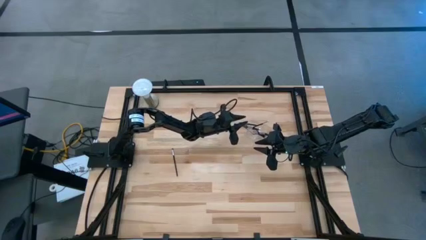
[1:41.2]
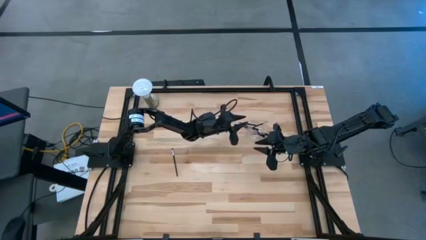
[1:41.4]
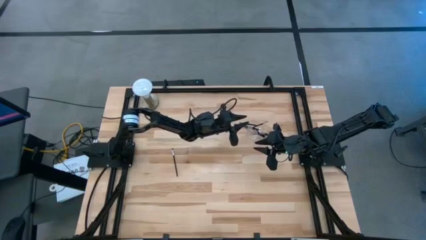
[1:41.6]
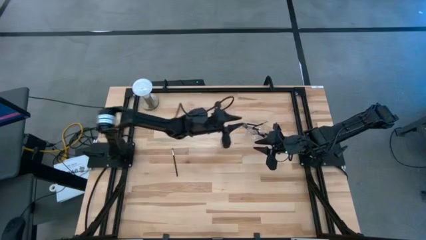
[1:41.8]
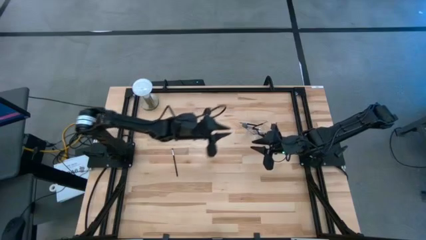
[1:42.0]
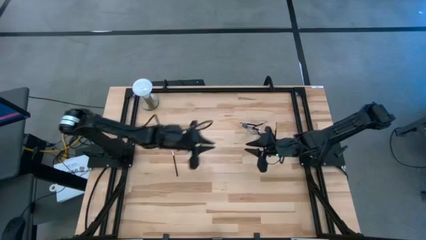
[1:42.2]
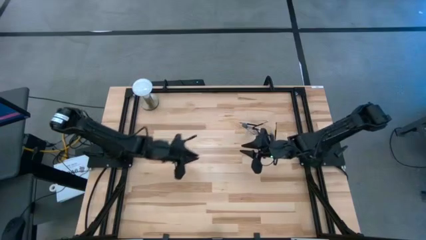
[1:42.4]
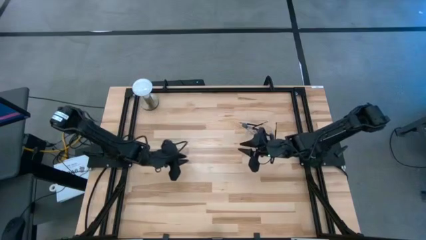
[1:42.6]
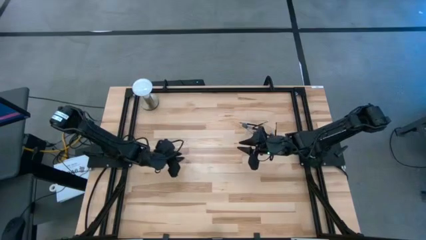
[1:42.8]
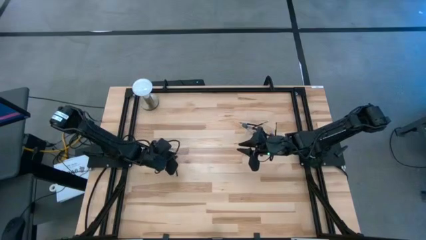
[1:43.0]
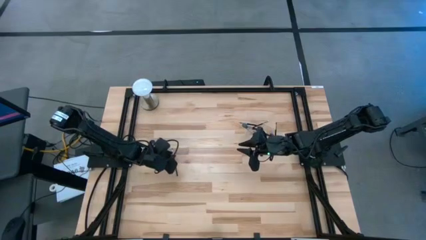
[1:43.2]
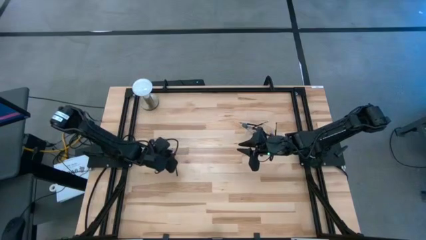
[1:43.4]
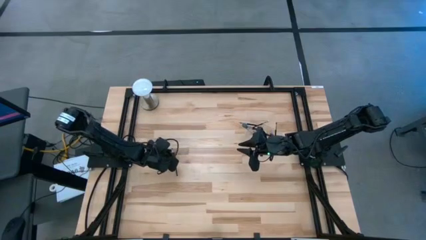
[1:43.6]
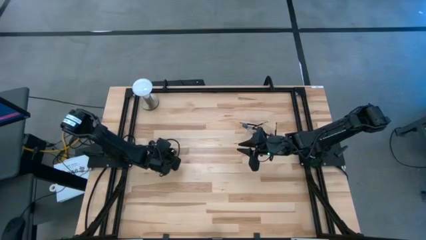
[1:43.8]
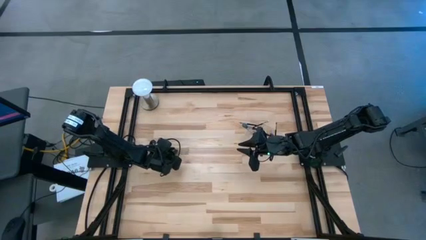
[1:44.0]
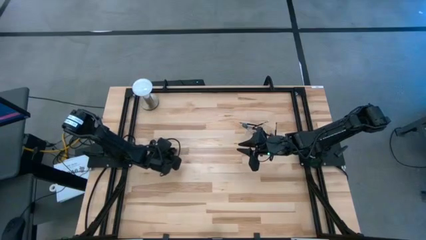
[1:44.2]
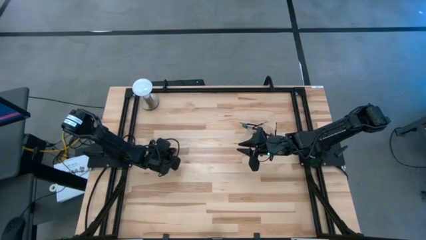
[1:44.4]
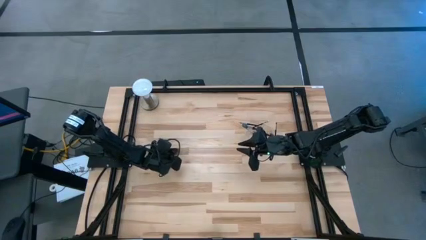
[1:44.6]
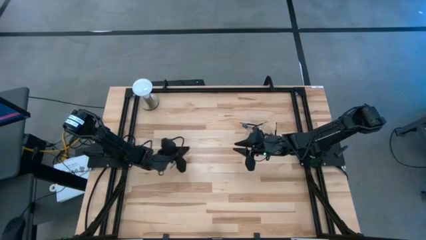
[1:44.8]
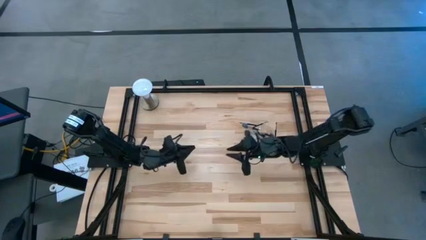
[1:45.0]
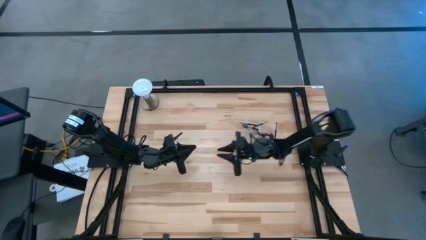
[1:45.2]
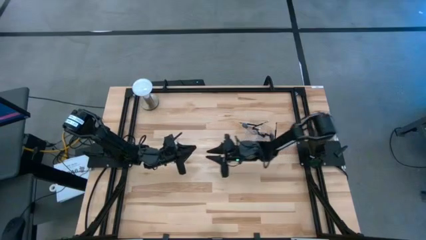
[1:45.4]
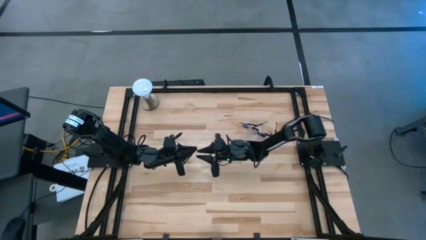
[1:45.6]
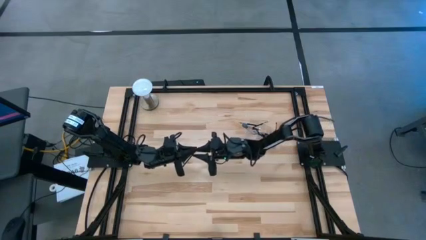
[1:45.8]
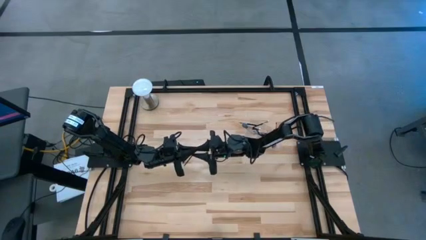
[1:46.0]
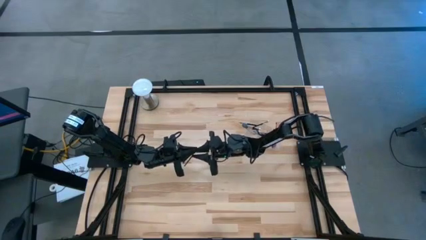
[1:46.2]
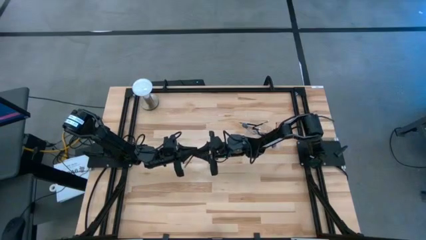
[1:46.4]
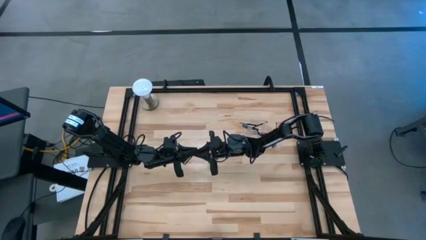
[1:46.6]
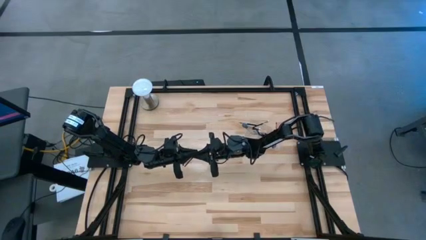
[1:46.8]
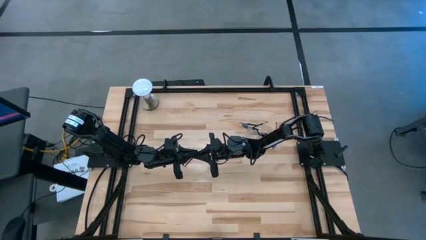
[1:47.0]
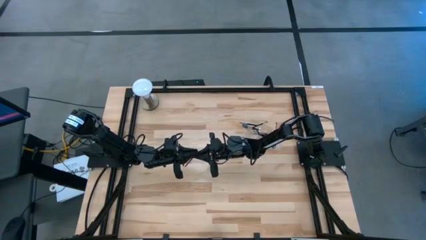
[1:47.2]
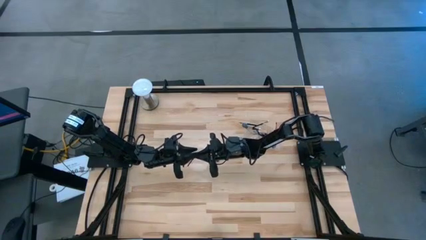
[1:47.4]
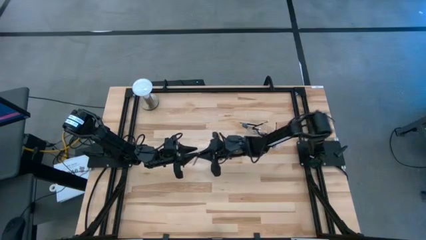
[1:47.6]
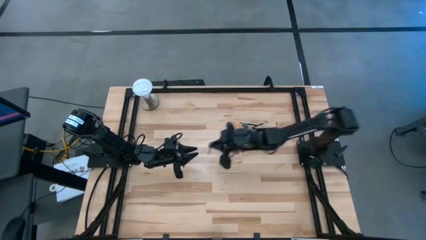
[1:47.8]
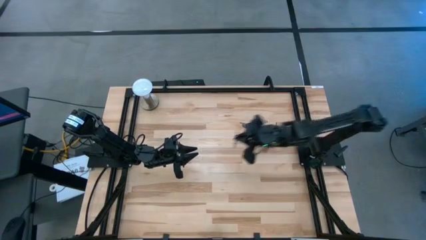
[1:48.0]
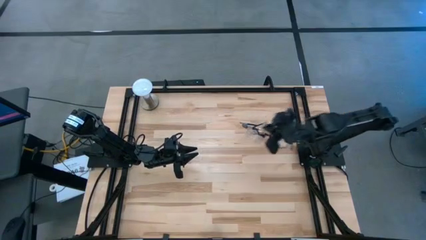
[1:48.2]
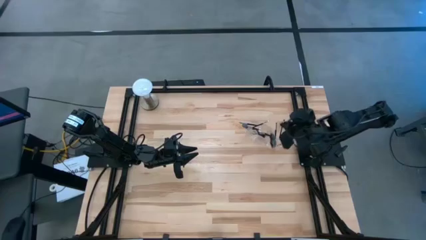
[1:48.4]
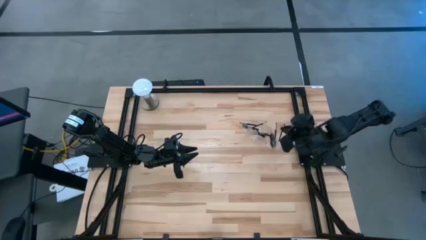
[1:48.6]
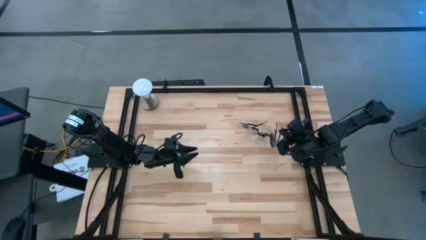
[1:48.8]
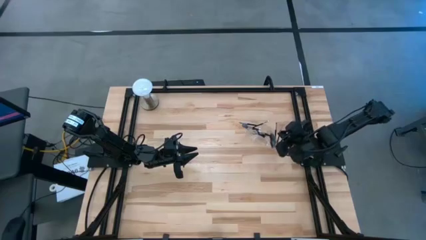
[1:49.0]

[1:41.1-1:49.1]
Task: Pick & Place Makeup Supplies
Put the black makeup brush into the transparent organizer

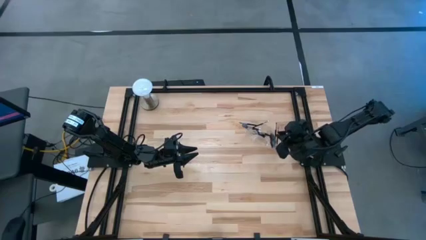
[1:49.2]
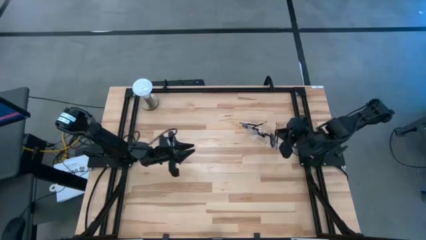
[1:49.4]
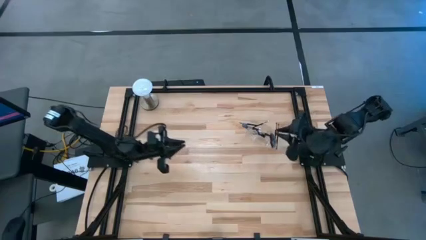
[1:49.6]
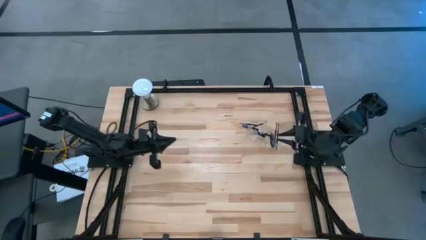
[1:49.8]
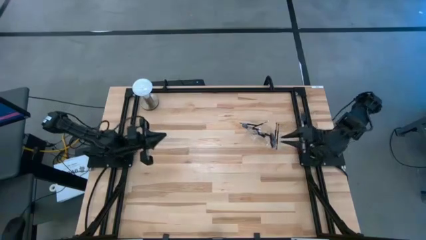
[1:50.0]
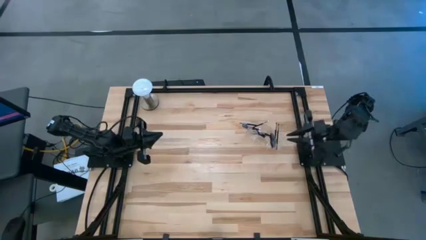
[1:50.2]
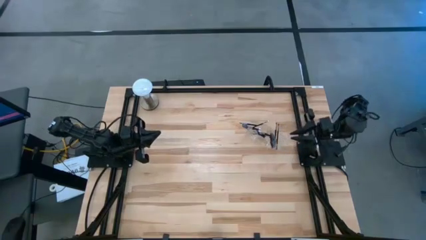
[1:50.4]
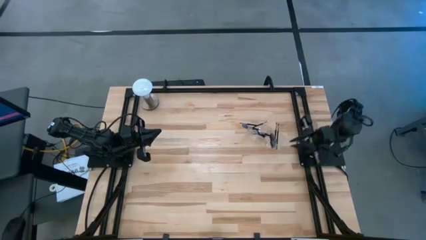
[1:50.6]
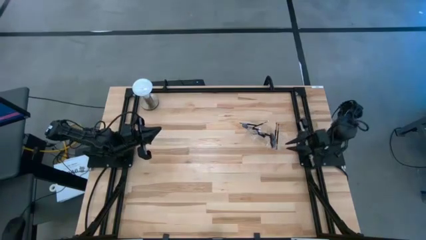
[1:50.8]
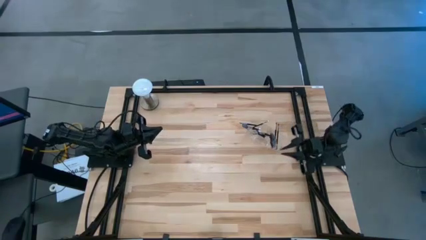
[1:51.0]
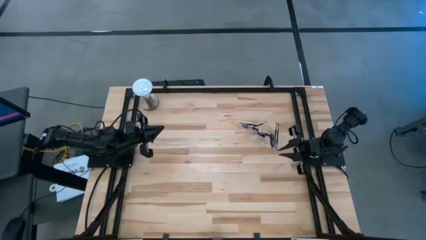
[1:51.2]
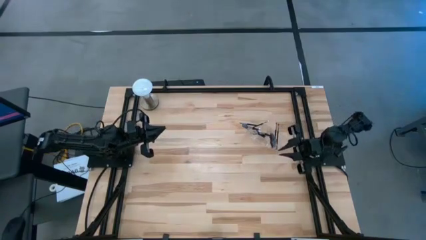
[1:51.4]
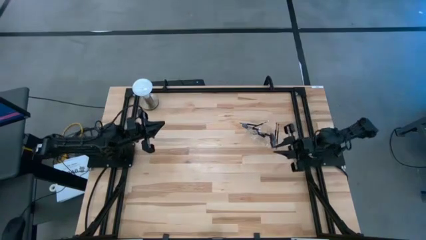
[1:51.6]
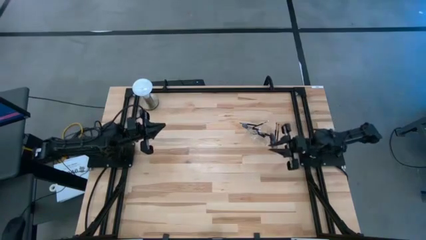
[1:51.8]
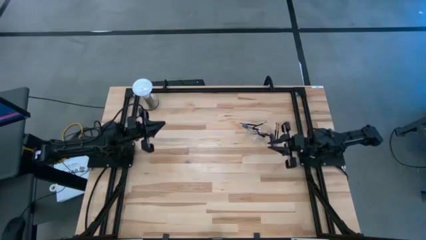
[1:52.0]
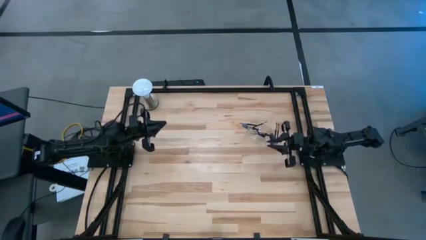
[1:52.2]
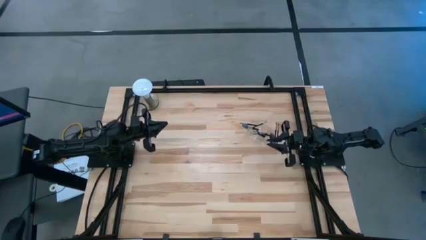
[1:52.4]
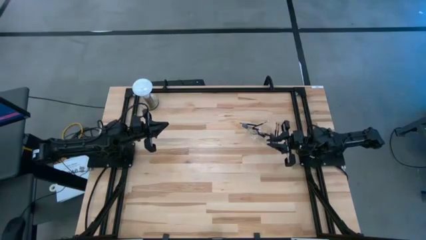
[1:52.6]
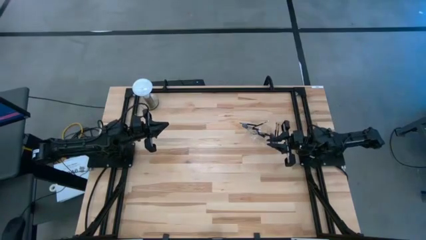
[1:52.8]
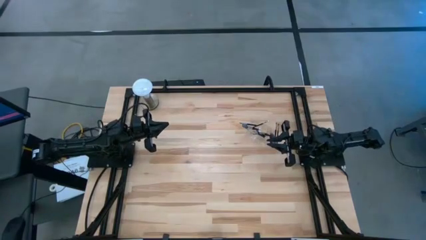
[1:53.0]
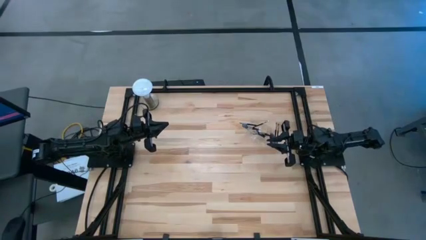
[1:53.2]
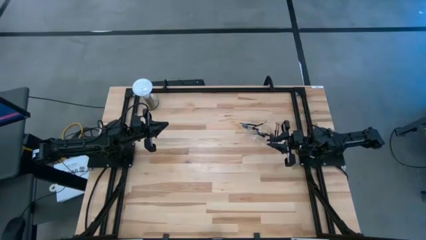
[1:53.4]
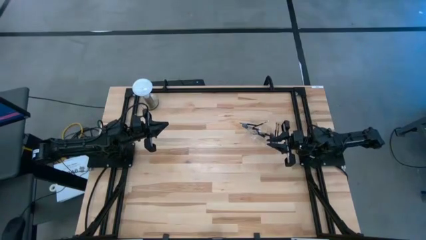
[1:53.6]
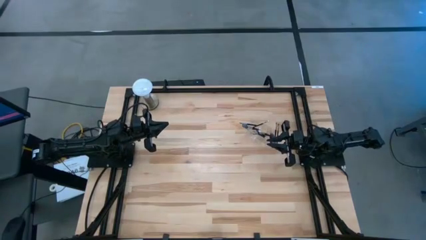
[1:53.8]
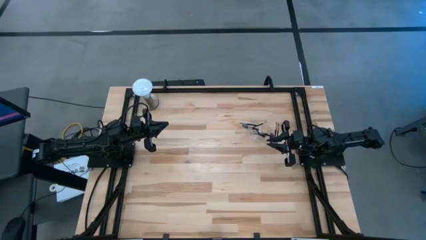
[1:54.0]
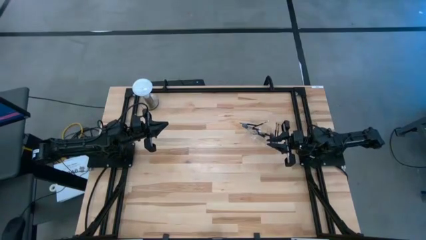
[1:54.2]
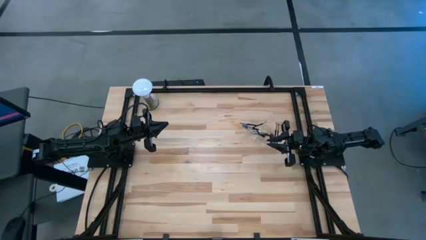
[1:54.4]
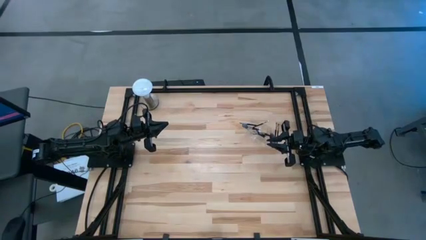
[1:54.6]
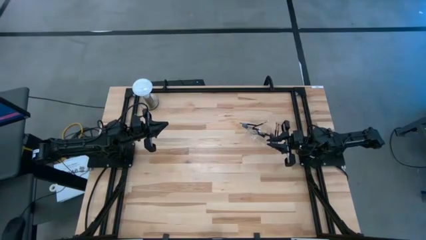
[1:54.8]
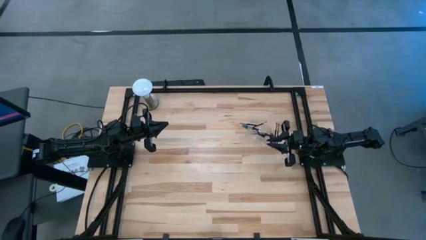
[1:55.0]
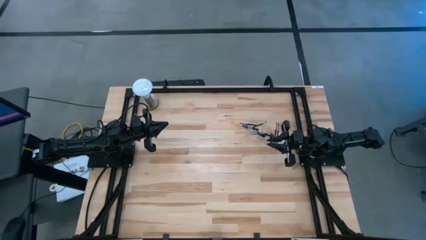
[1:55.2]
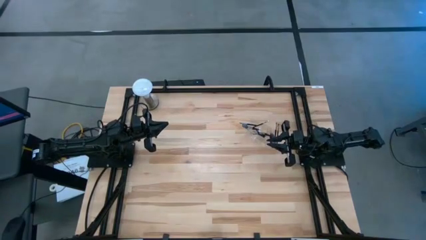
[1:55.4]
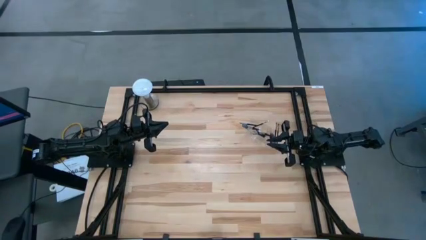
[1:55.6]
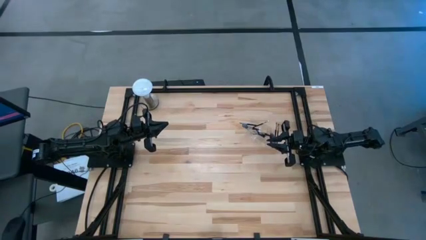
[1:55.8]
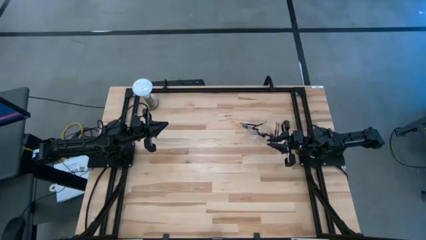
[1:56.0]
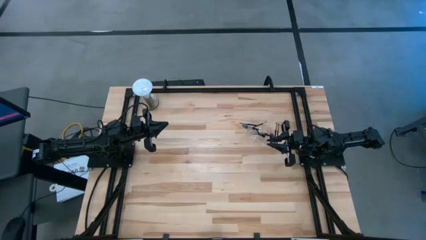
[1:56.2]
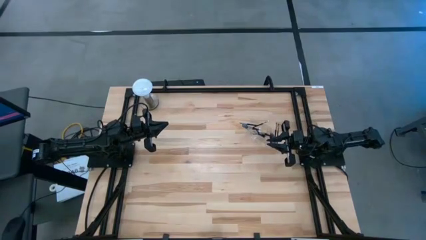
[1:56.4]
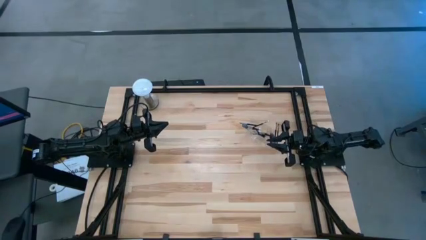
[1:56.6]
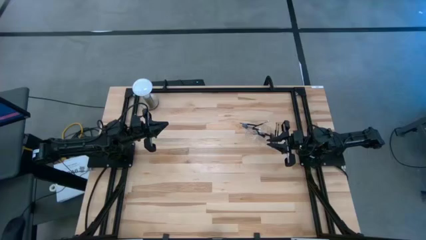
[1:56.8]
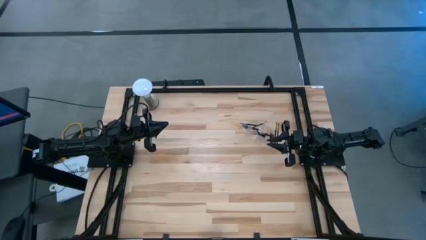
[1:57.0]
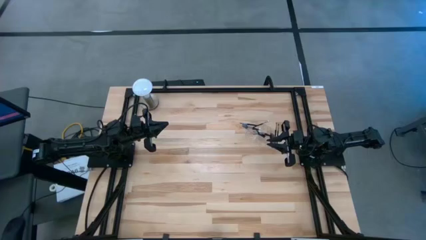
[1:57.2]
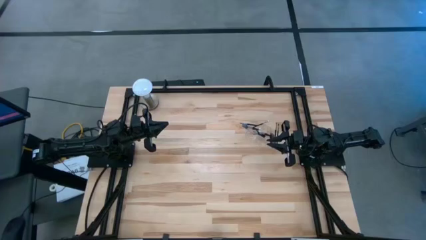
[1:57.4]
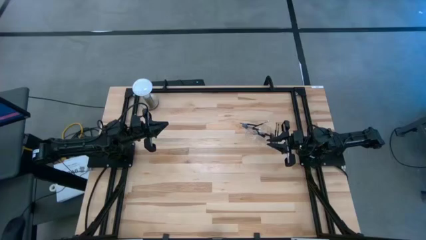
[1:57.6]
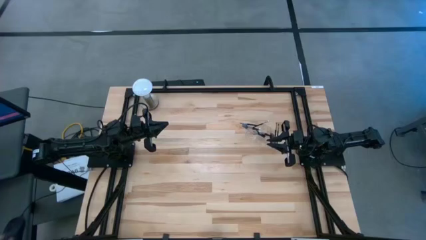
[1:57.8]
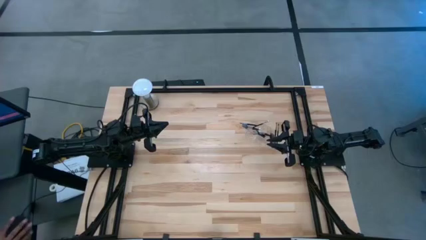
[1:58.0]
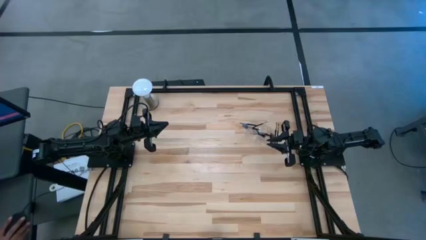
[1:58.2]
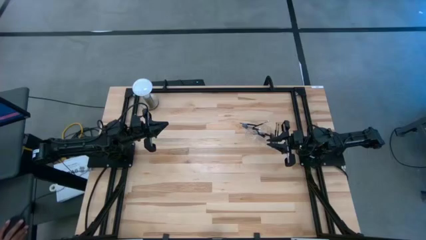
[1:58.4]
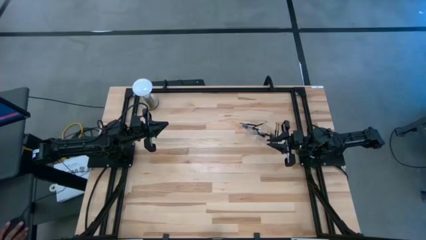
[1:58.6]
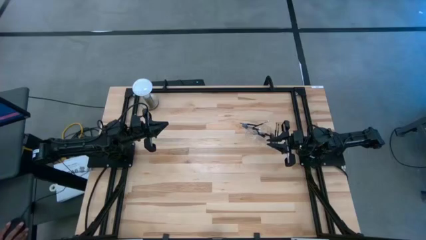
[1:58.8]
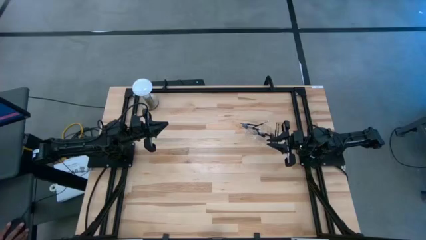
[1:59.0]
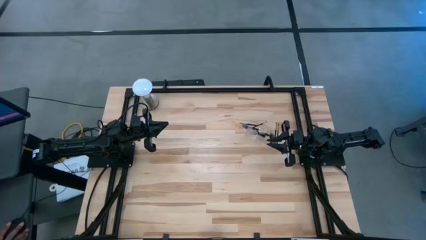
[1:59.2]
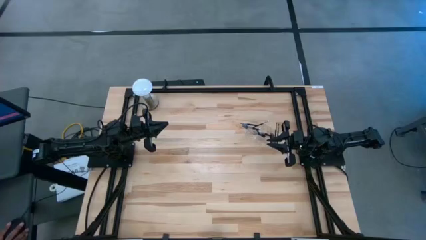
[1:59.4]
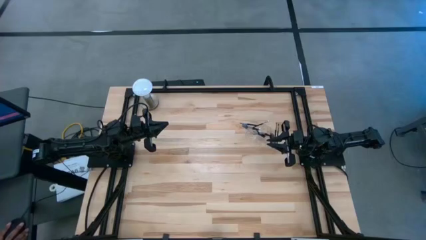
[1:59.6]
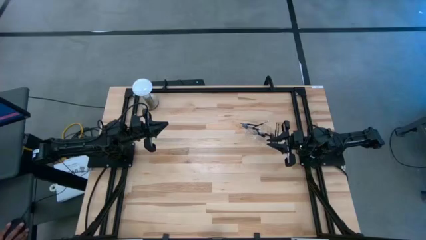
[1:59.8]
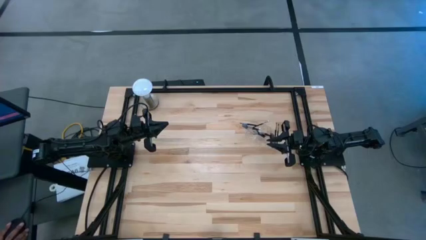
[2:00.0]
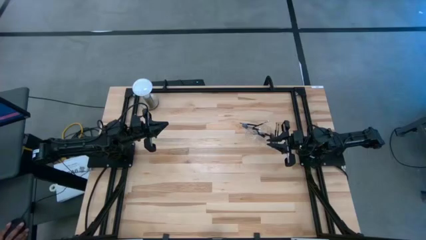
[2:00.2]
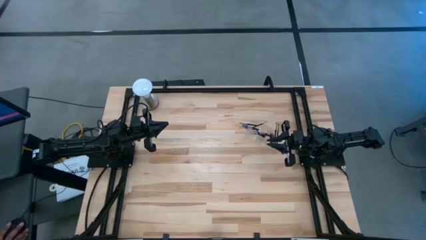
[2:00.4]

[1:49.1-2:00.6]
Return to Home Position
